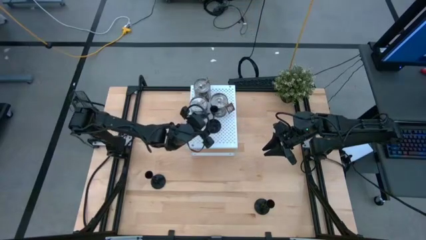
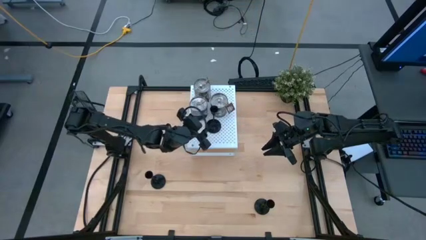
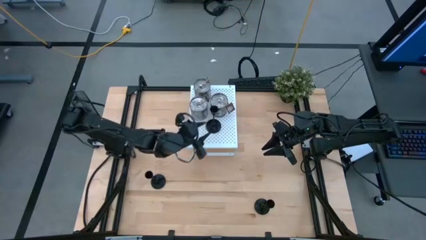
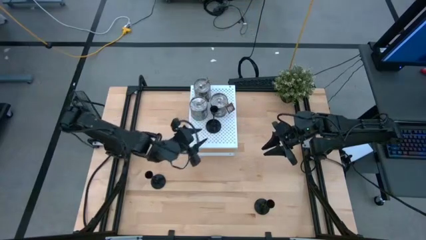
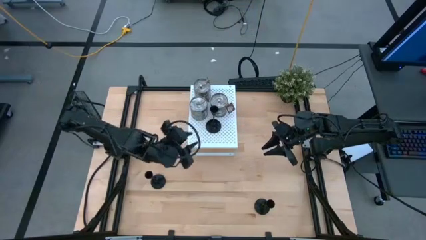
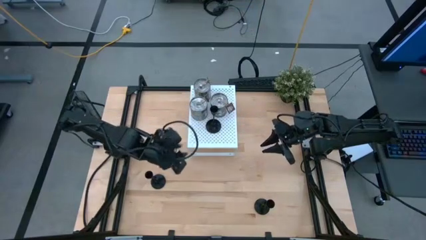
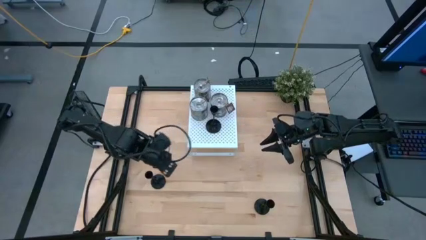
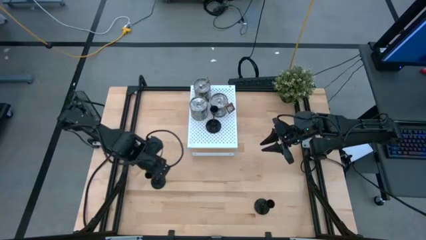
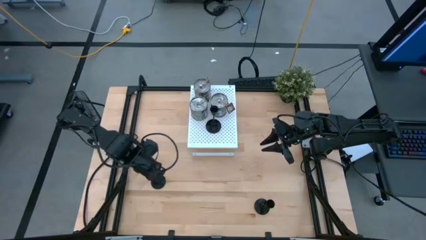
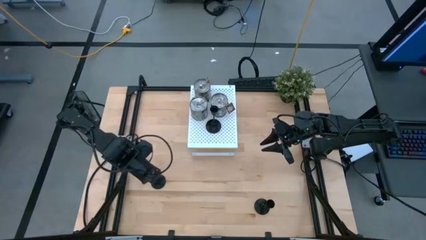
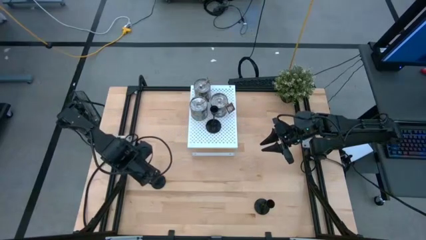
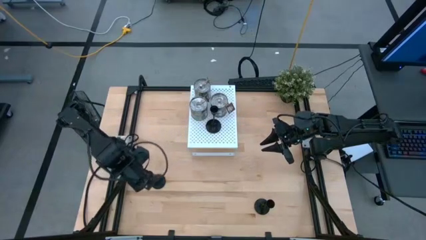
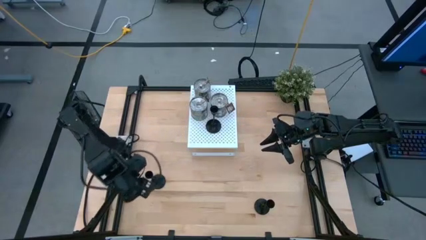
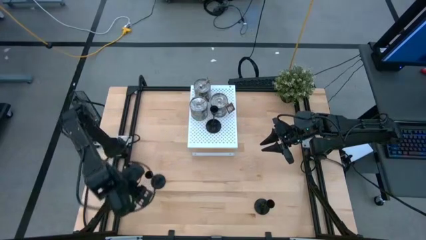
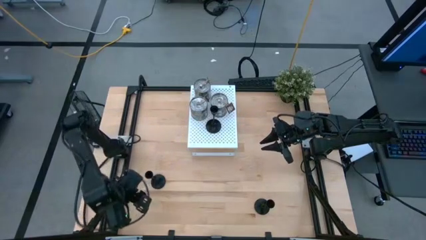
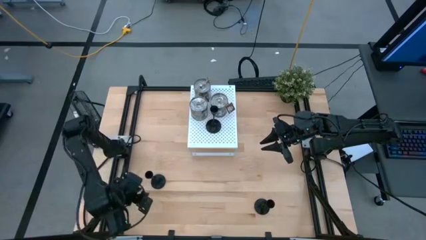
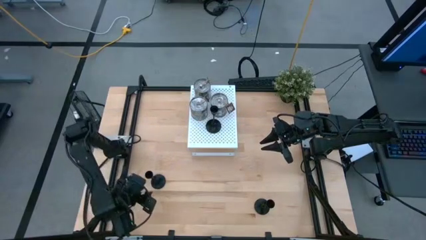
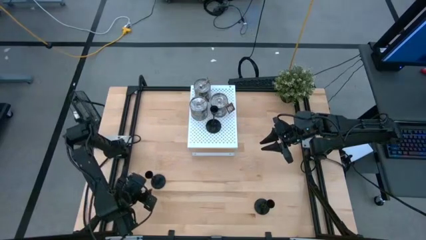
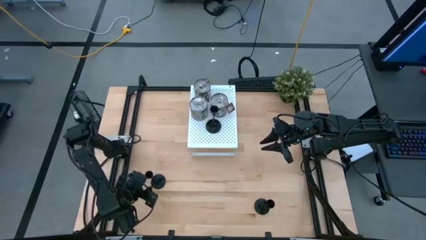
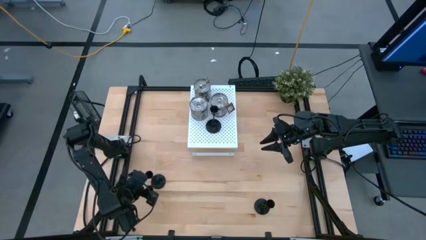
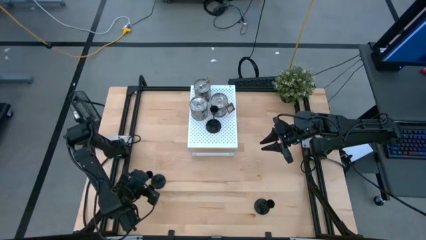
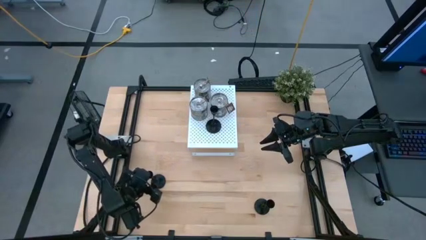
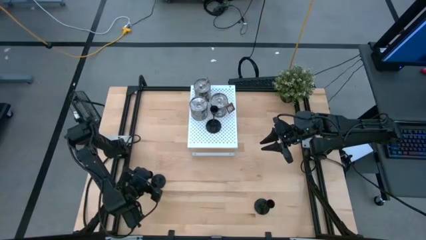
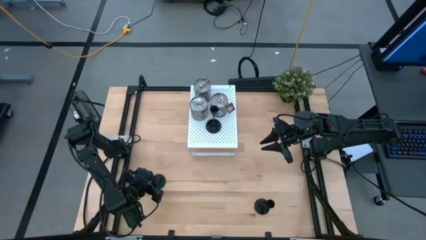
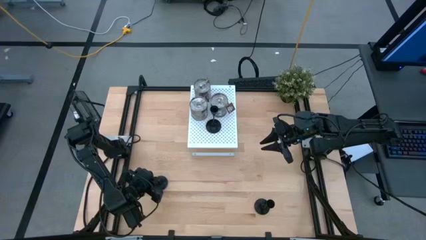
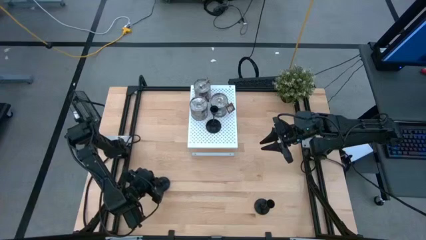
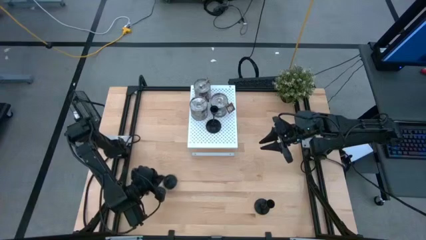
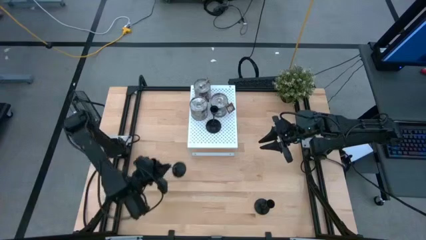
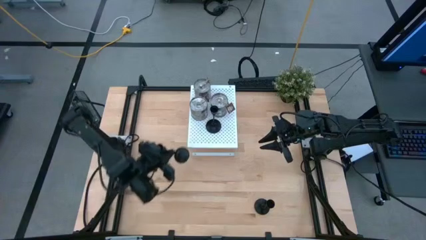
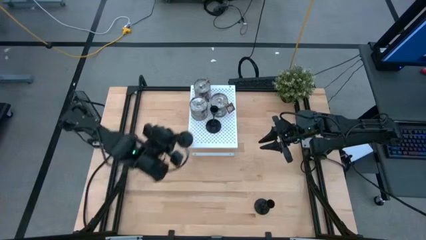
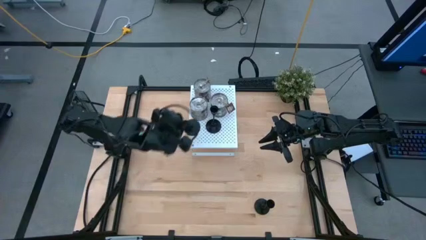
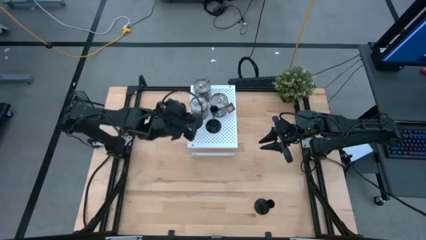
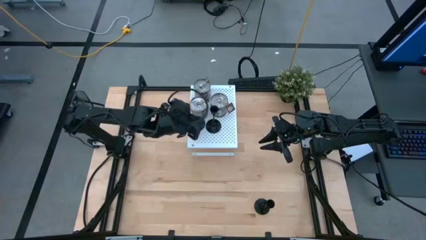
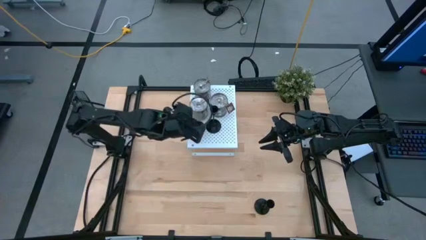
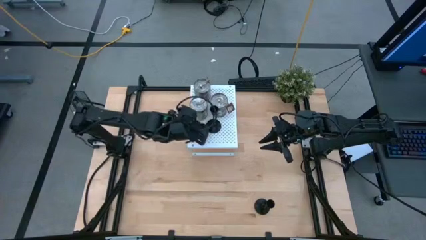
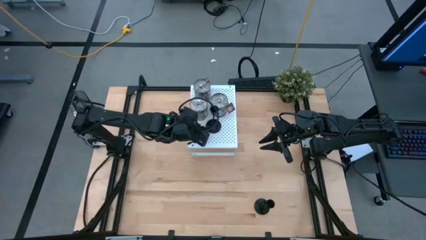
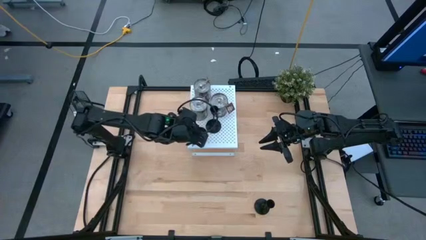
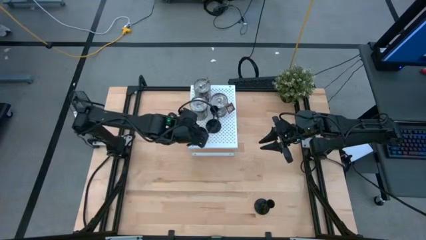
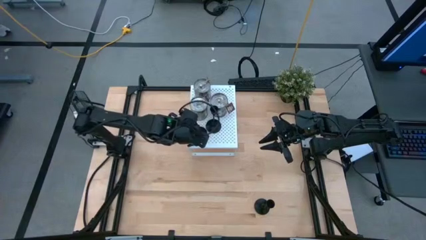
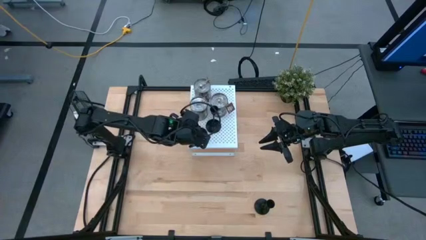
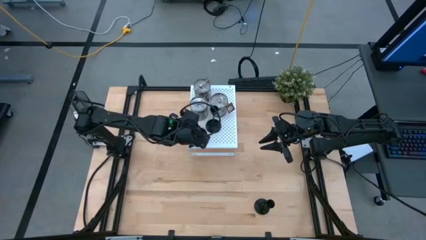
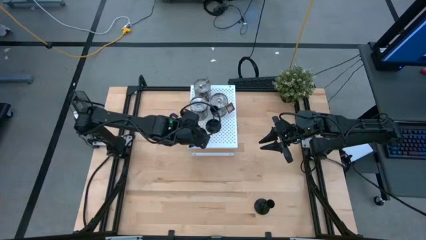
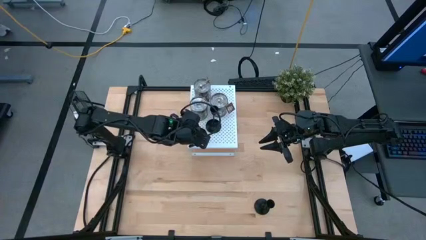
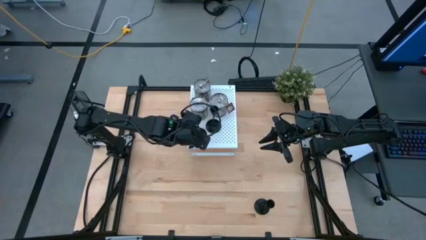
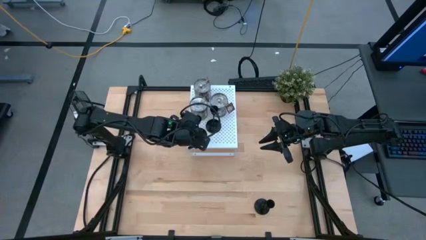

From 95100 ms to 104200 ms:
Task: Pick & Place candle stick holders
Put the left black candle holder on the shelf

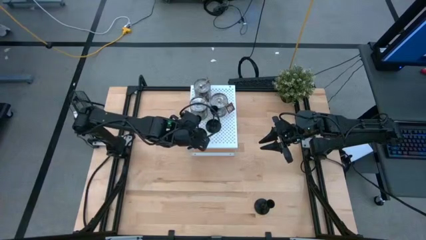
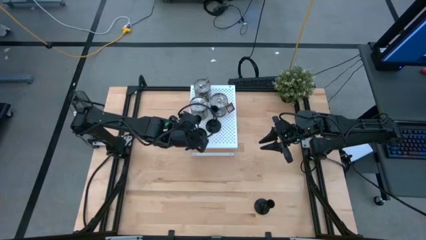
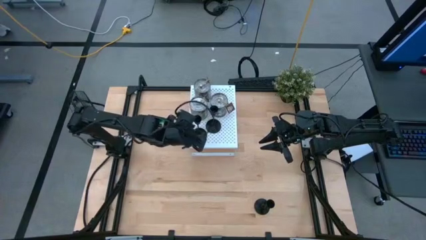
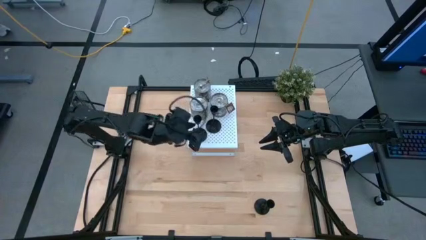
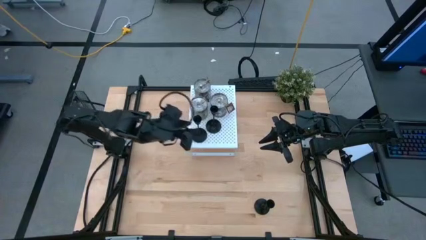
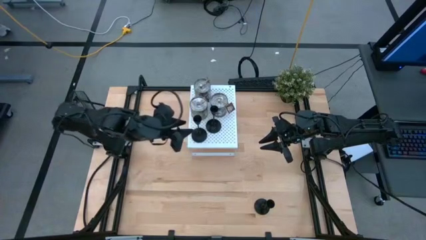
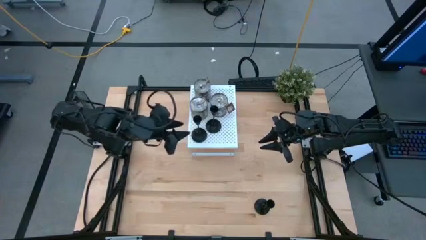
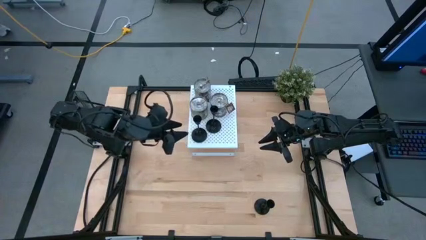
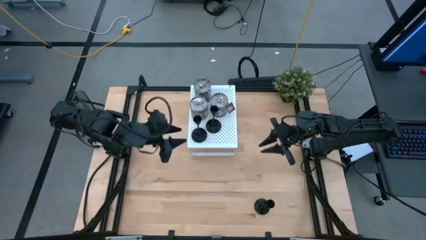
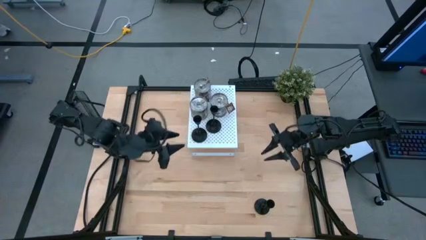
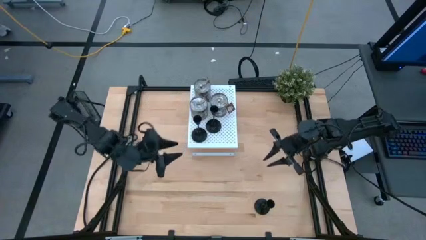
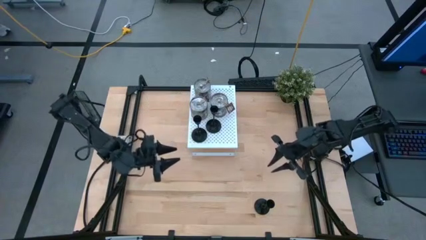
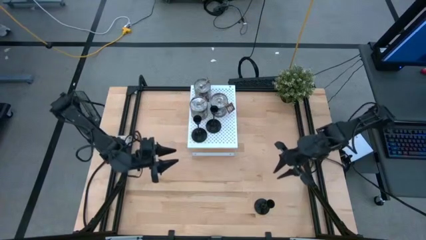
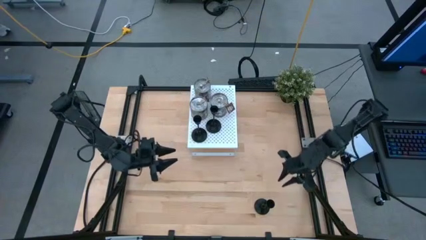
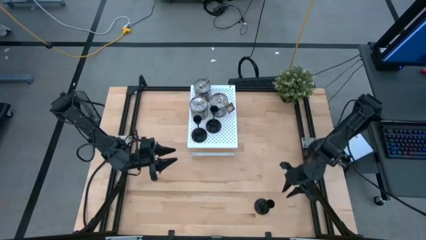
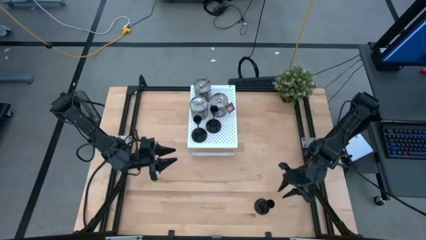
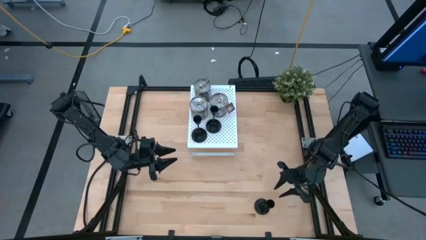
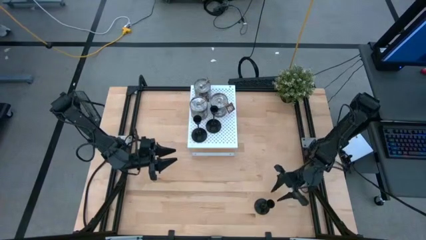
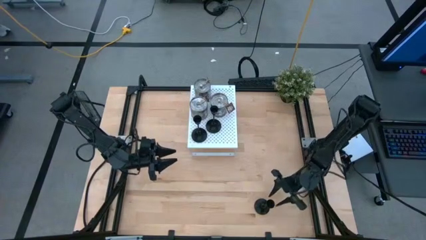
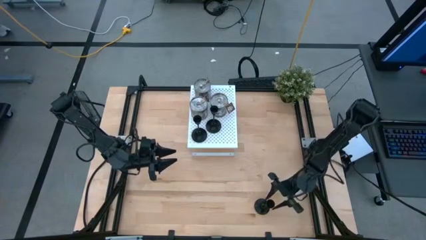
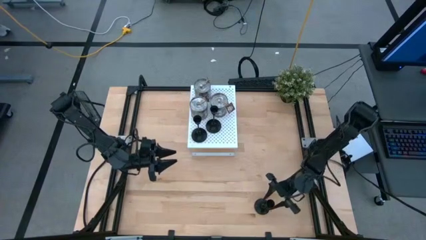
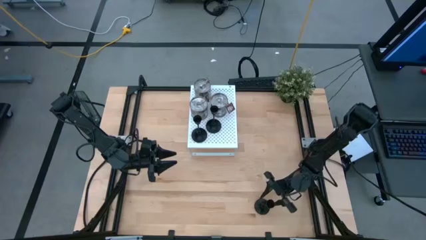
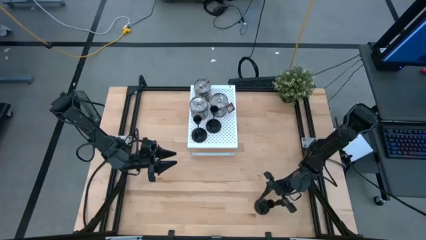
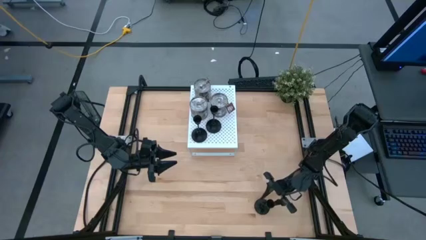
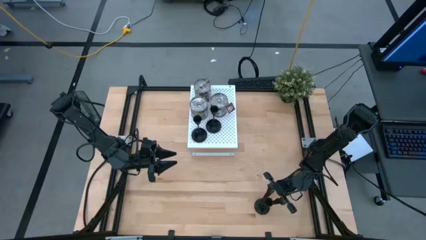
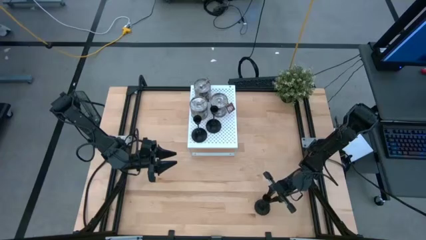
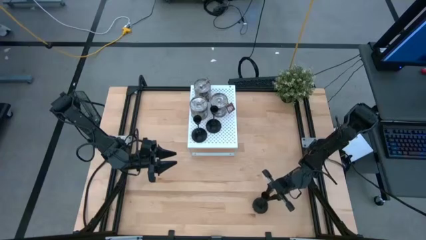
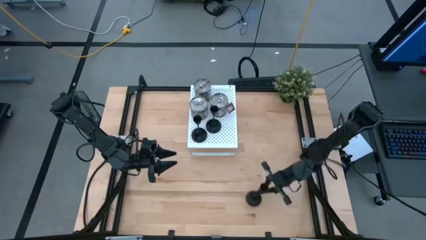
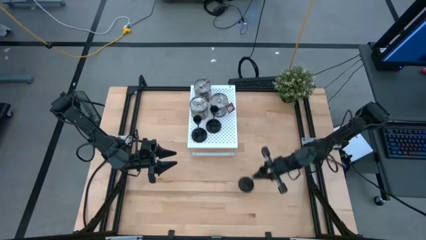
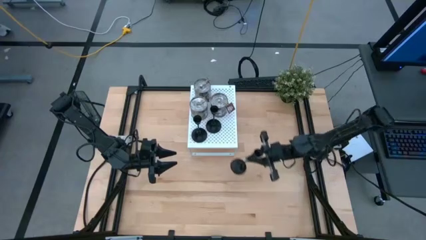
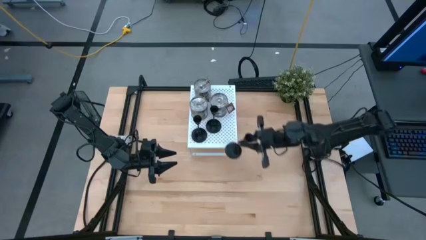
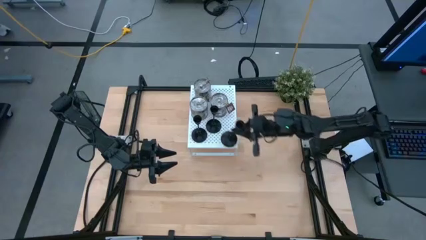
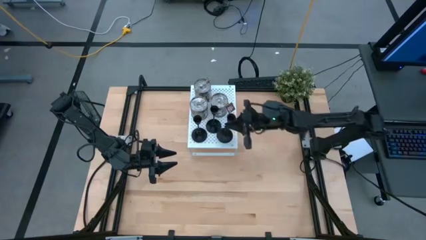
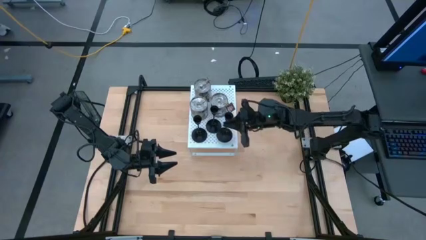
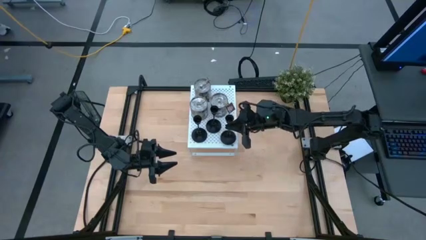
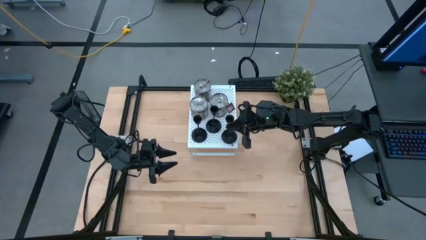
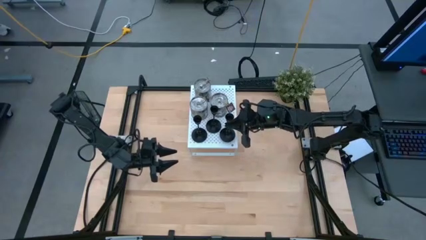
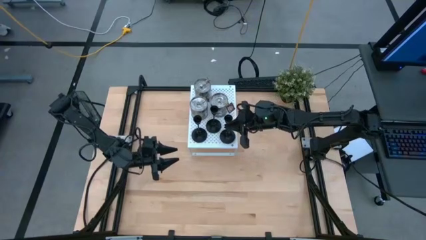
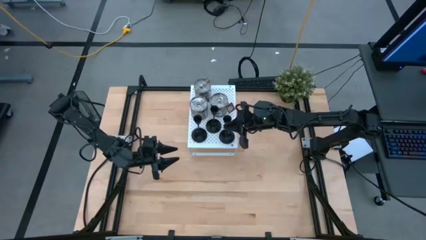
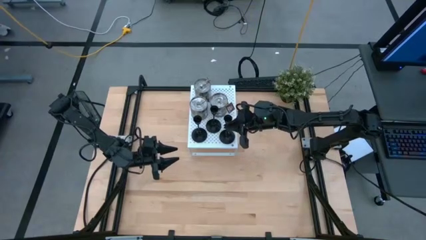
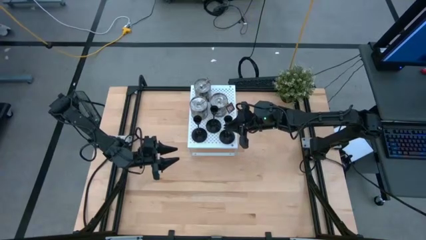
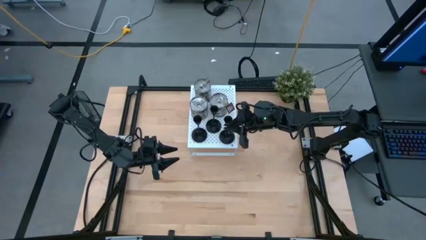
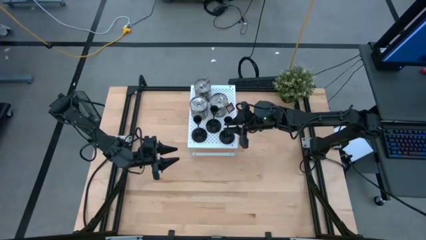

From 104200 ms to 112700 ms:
Put the black candle holder on the shelf
